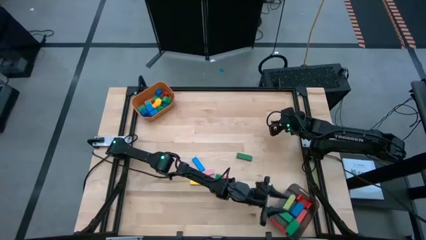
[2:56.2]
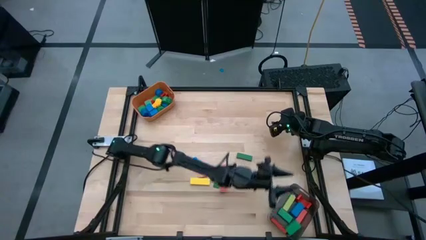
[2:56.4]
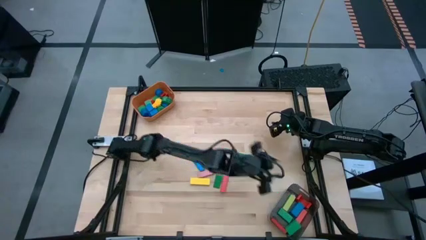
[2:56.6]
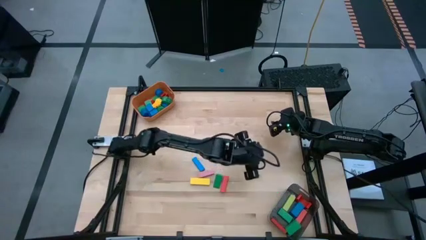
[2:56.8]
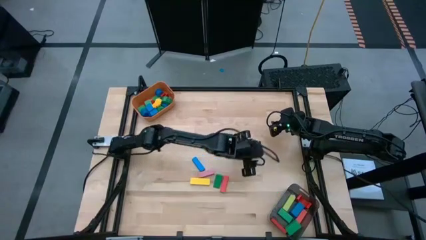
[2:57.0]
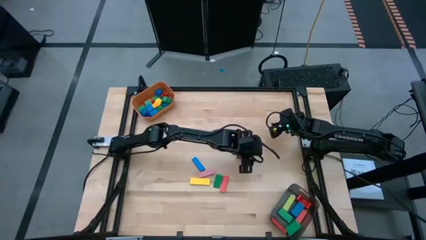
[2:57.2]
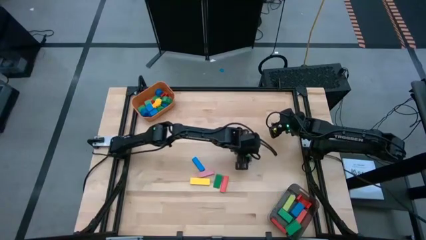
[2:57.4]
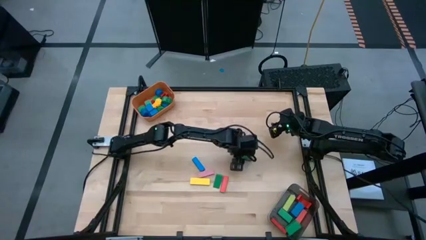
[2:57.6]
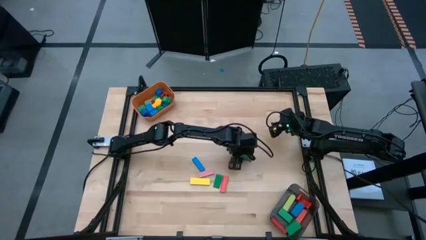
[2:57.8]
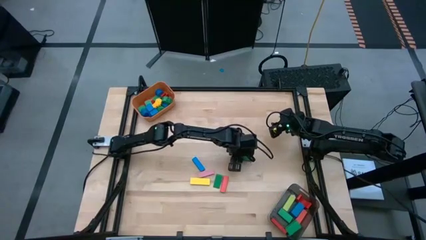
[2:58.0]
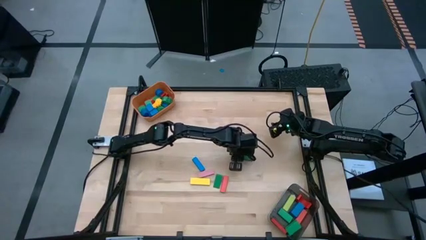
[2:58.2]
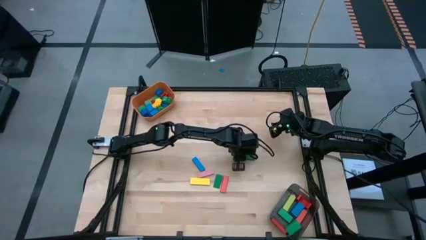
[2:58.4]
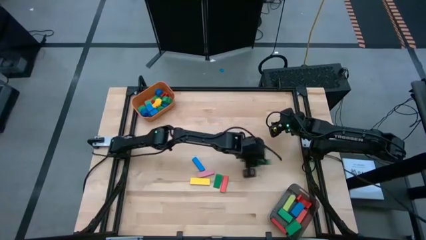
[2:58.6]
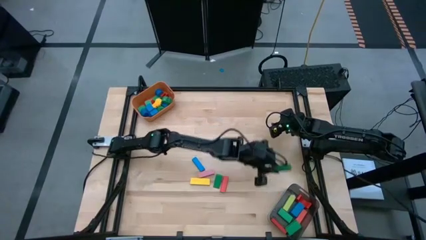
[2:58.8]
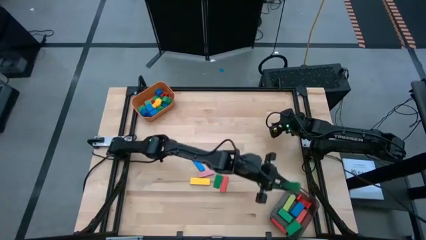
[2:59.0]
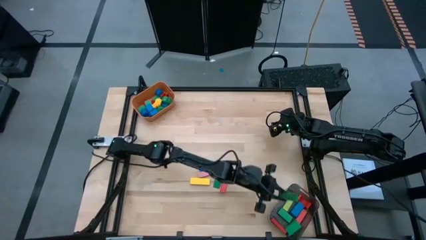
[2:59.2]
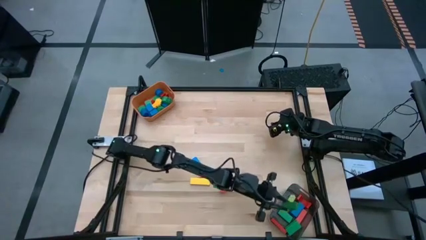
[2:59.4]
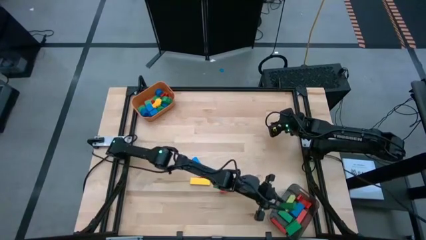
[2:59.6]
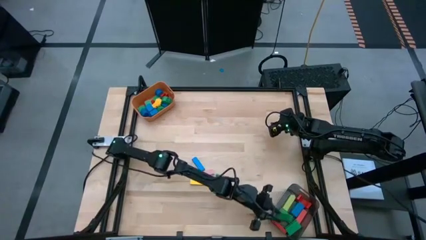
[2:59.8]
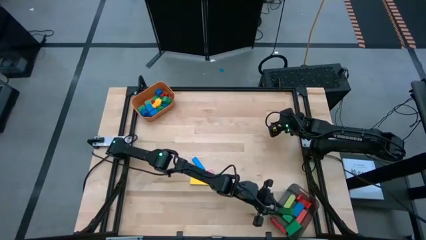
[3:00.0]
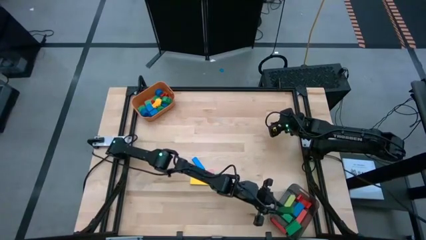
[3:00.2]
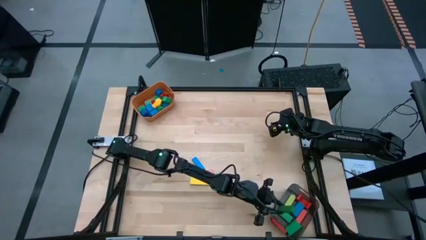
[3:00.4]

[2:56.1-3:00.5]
Task: Sort blocks by size
Put the big green block into the black bin

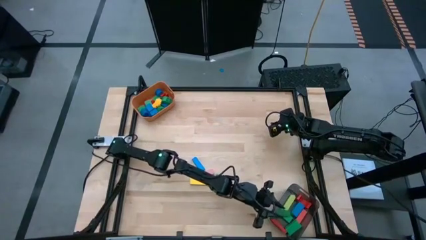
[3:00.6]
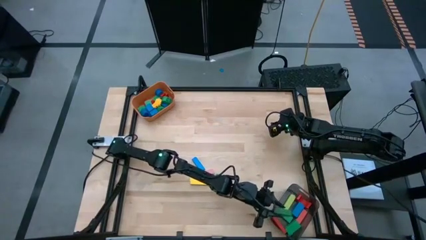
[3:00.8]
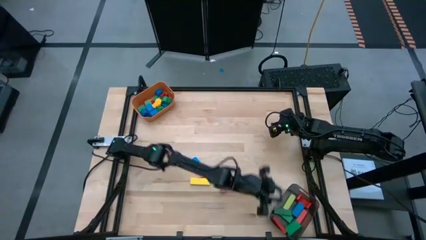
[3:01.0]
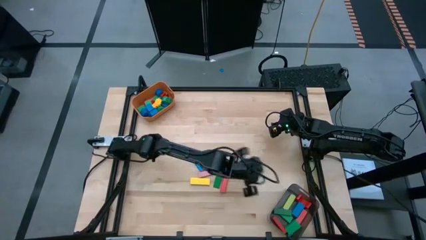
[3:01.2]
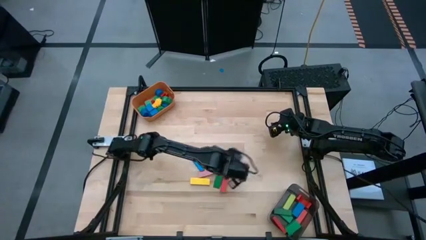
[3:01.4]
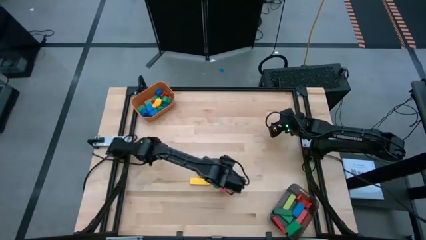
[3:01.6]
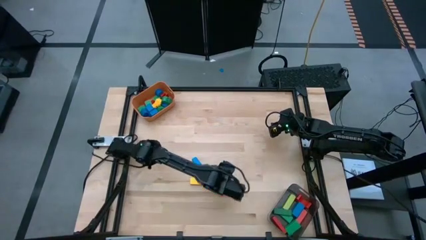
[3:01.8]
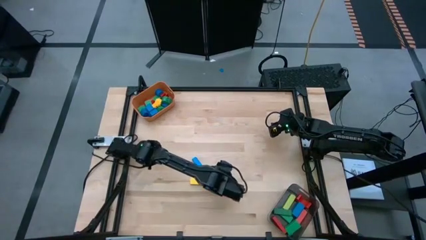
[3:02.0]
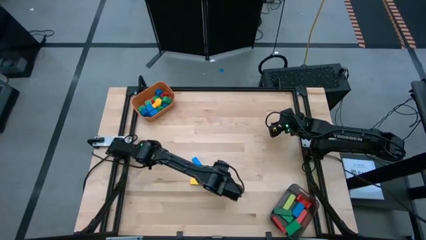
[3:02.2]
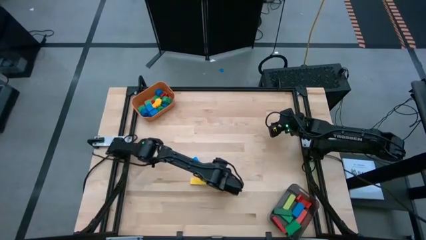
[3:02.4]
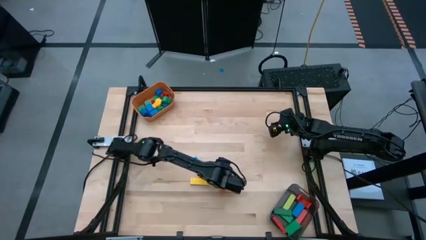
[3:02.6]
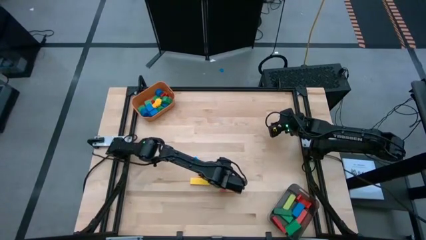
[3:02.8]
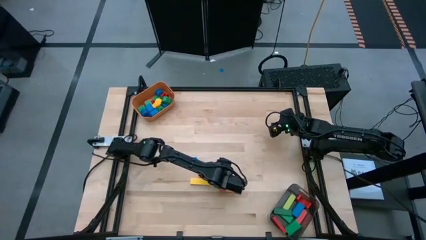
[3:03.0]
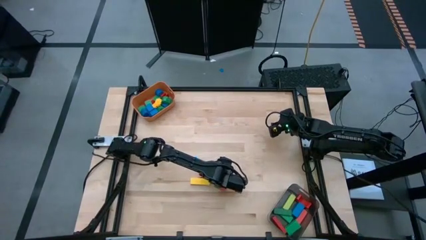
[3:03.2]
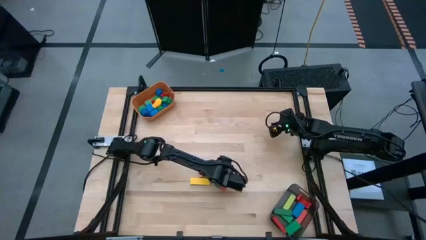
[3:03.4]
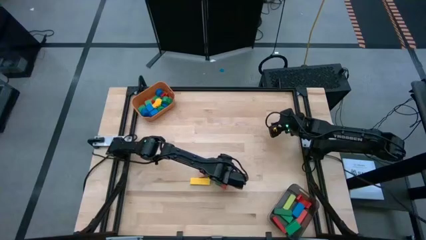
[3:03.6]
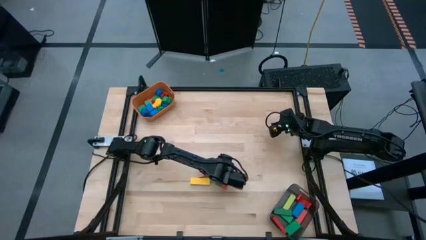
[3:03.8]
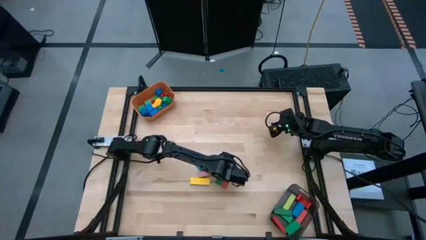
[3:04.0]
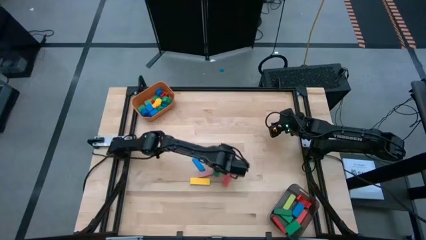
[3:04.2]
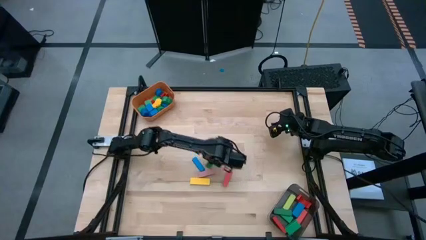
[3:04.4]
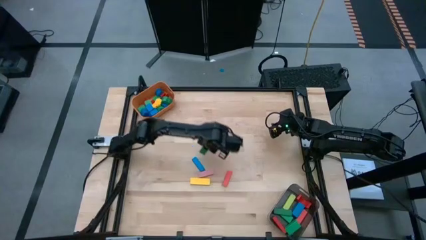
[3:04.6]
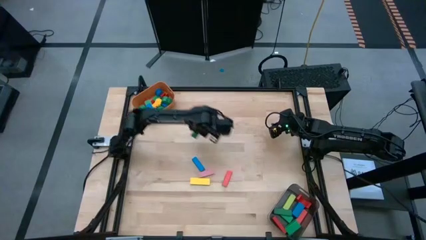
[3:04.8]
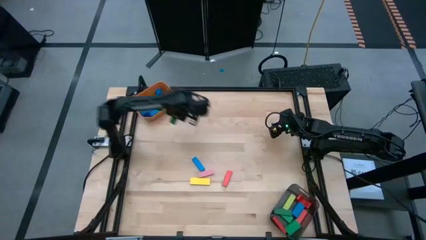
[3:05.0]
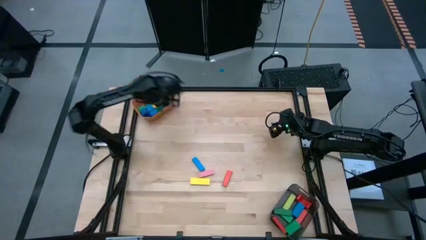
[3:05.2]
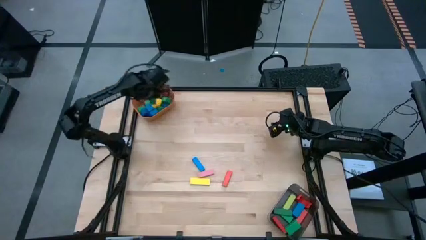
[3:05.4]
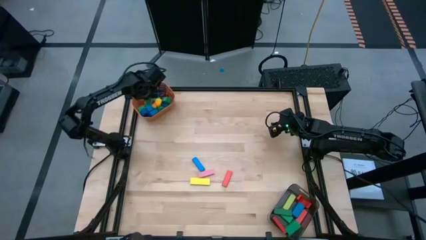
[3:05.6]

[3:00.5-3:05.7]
Put the small green block into the orange bin

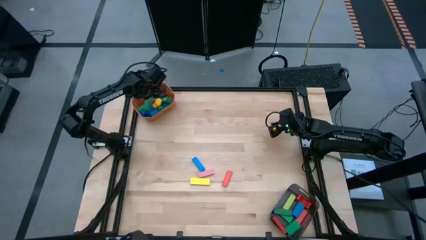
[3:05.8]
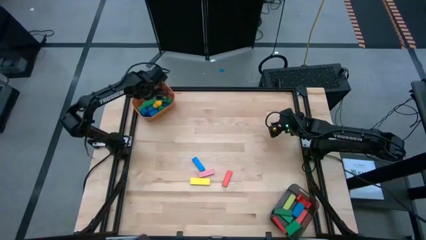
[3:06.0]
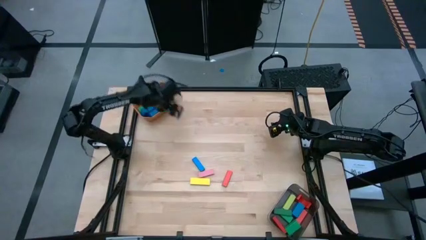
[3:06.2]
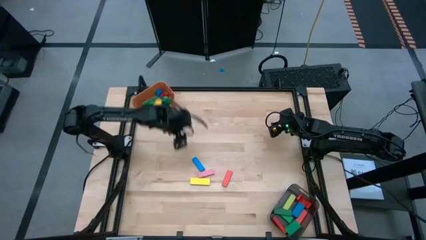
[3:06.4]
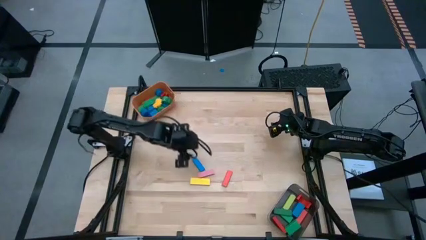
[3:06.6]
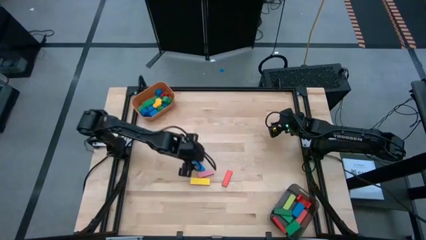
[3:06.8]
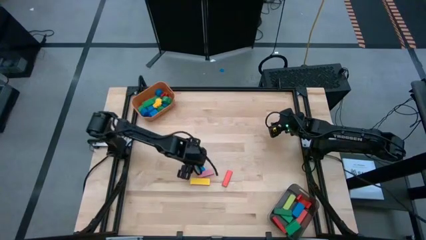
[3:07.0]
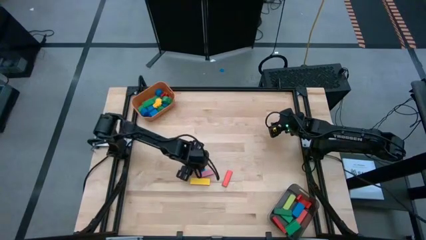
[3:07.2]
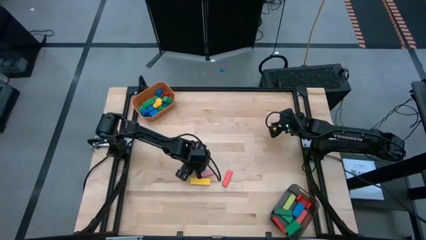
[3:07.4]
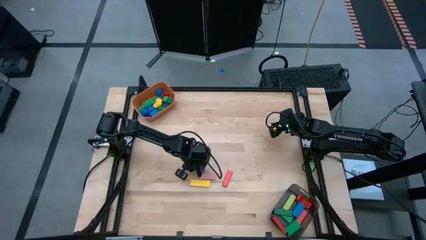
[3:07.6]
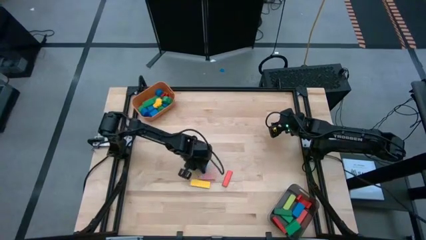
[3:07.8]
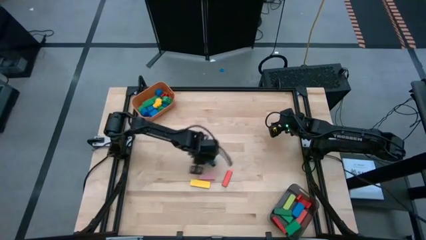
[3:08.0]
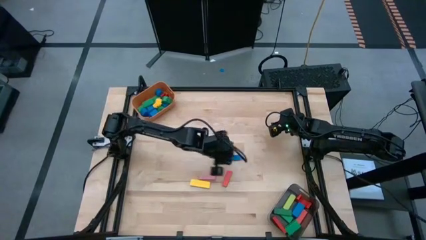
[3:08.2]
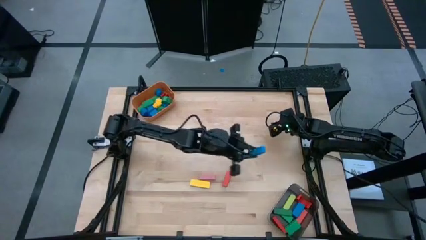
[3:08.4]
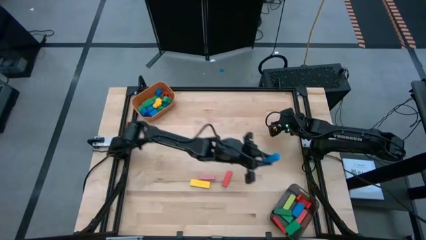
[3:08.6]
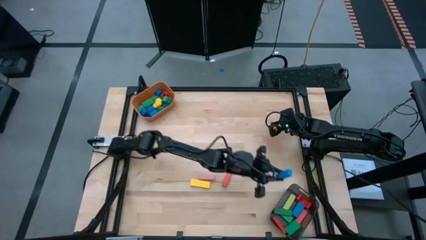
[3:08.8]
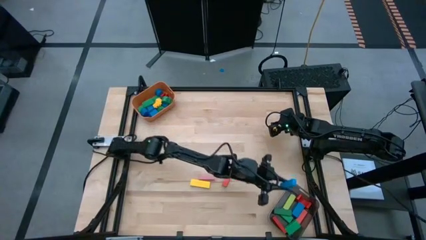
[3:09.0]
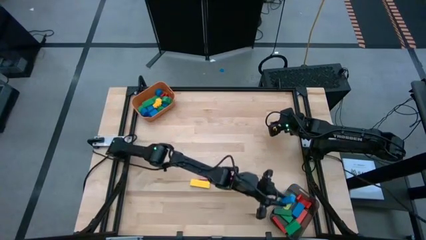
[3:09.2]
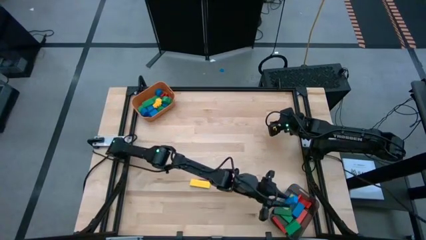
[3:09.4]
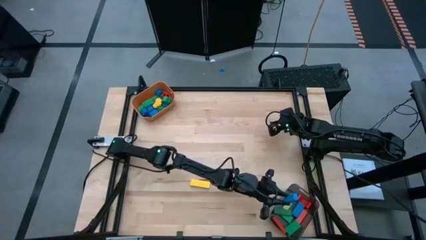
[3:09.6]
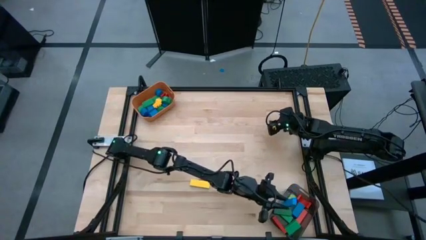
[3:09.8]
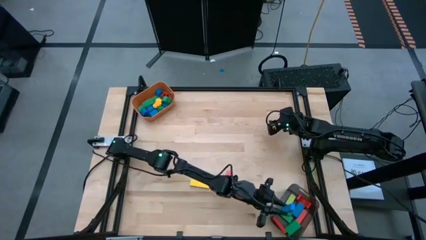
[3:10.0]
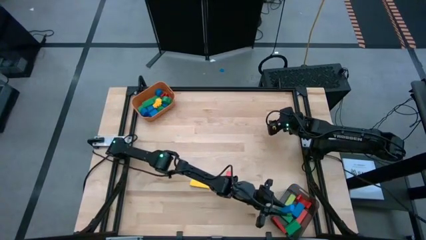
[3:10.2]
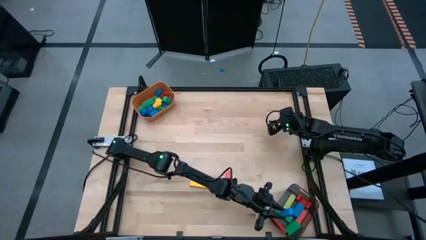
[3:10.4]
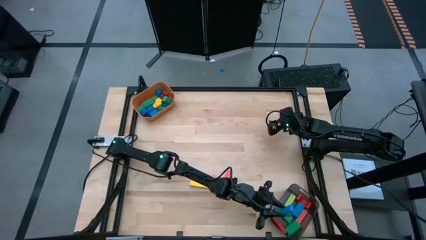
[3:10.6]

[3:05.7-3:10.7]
Put the big blue block into the black bin

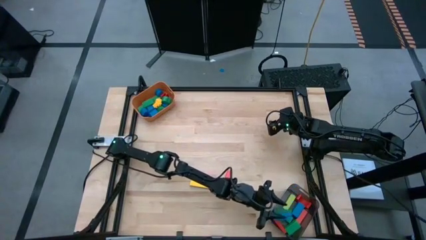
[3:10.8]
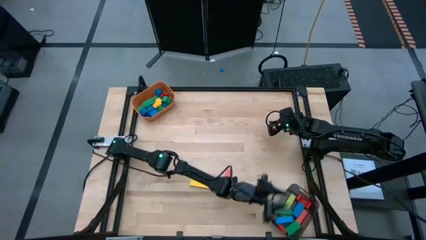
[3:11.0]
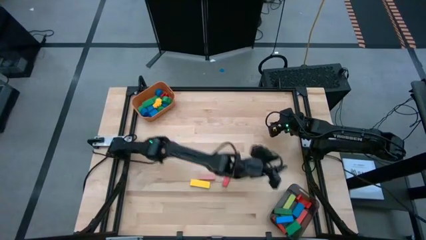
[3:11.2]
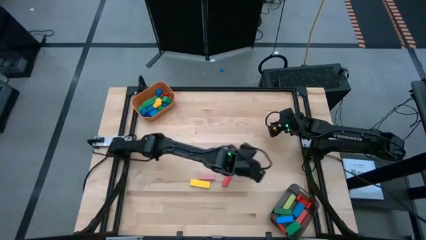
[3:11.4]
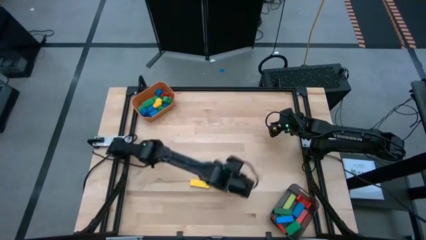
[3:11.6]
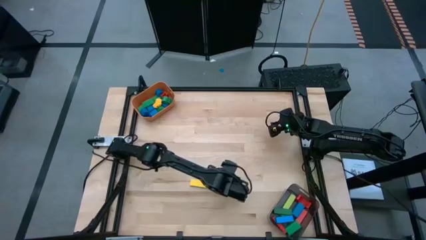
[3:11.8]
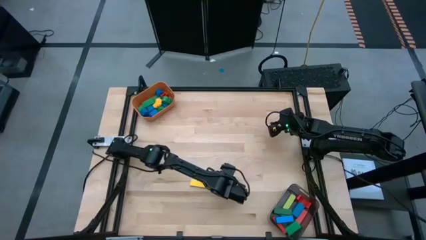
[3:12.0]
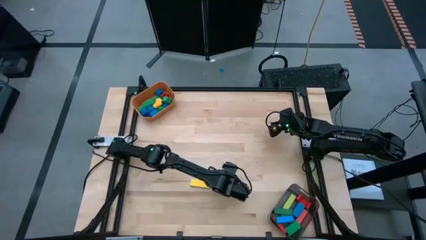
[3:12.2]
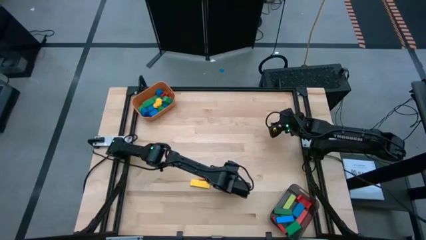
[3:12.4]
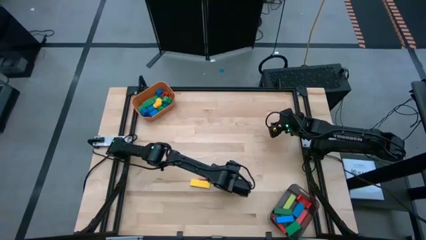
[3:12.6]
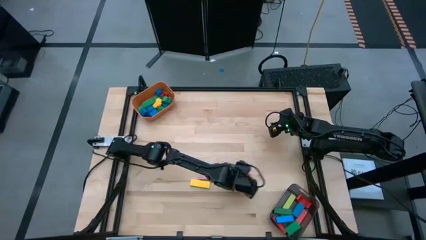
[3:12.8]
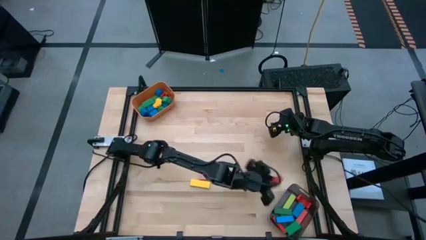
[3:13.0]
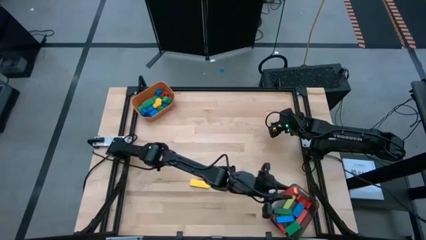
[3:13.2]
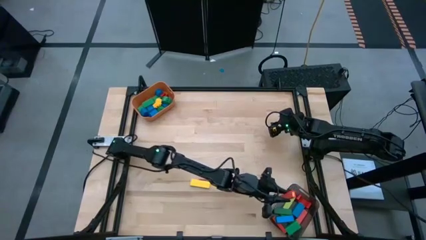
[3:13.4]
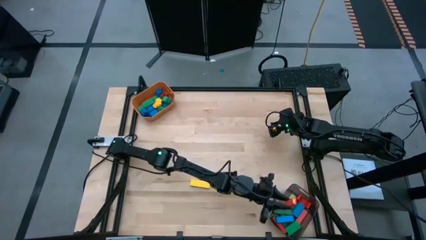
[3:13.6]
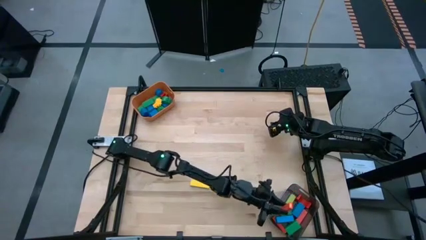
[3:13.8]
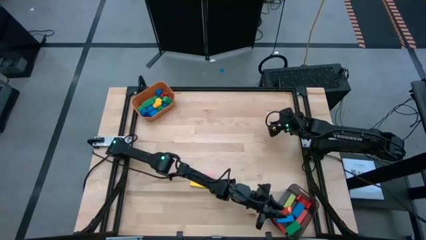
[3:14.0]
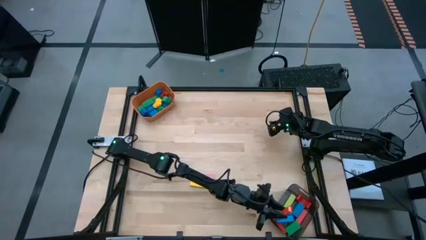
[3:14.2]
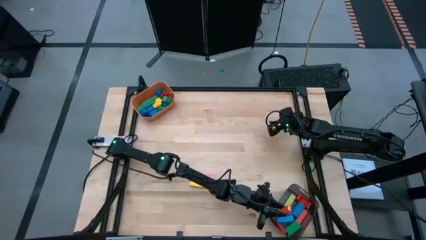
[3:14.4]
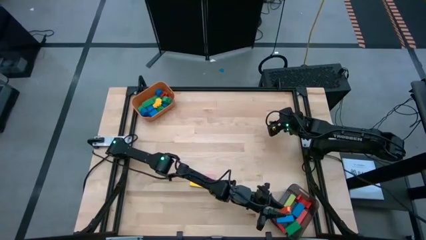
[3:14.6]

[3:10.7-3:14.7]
Put the big orange block into the black bin
